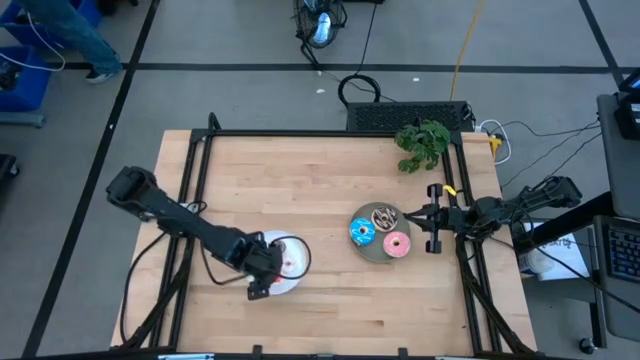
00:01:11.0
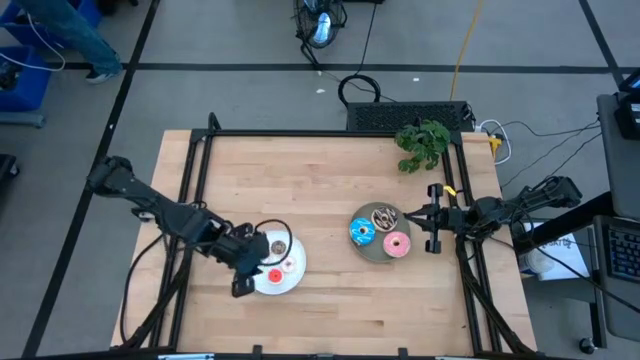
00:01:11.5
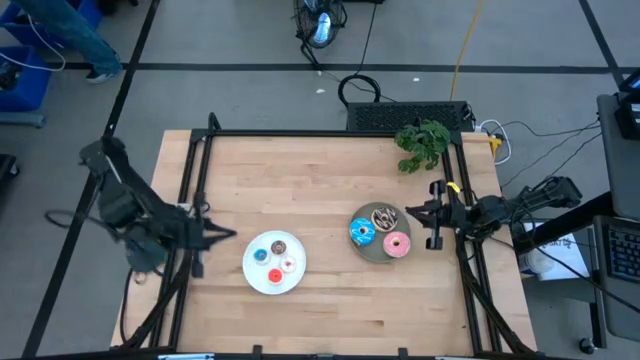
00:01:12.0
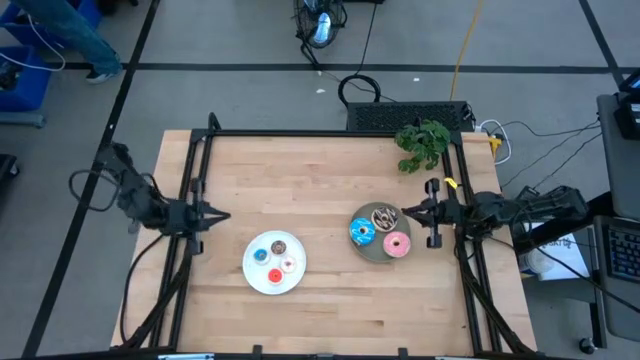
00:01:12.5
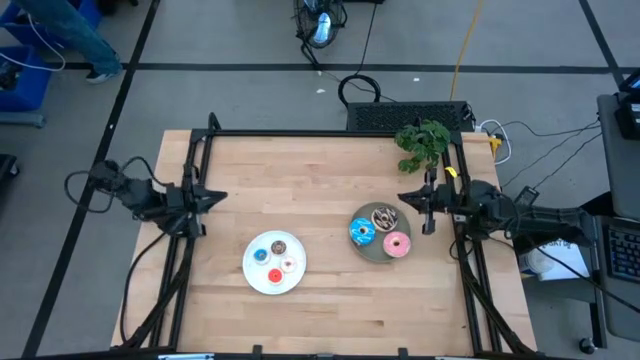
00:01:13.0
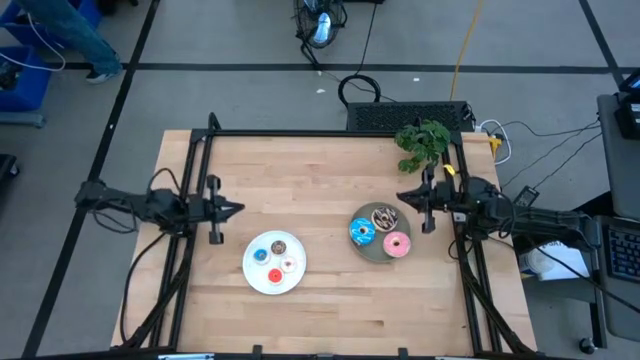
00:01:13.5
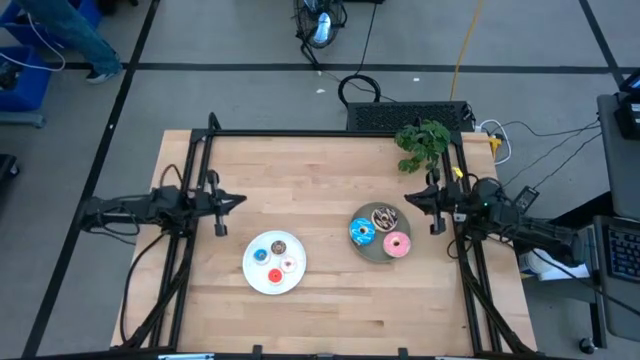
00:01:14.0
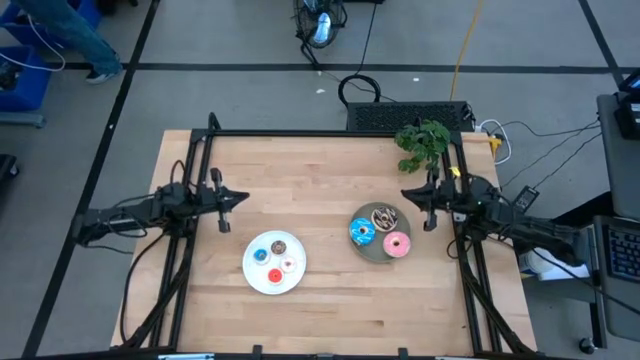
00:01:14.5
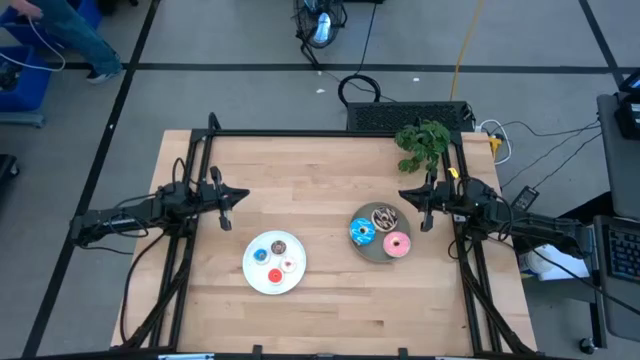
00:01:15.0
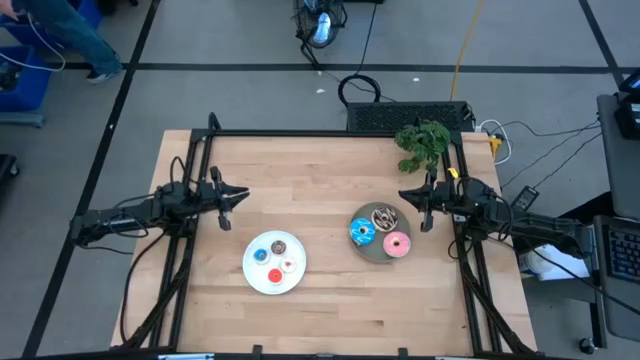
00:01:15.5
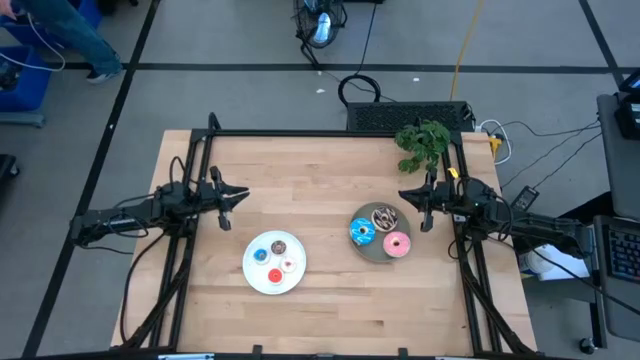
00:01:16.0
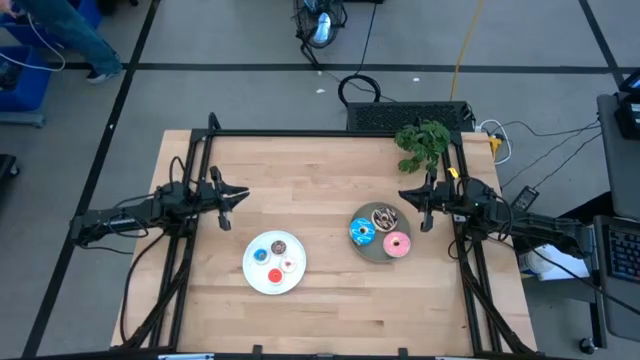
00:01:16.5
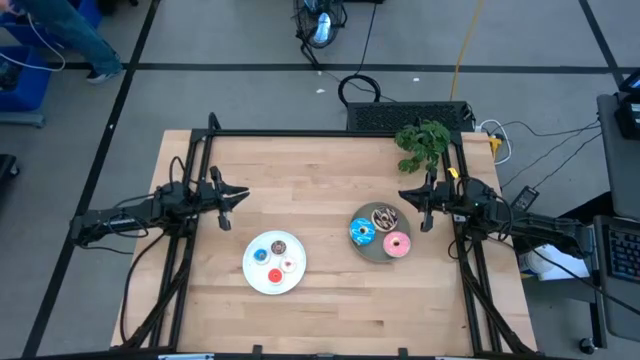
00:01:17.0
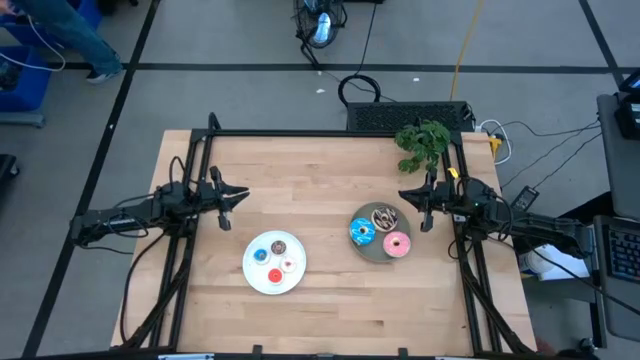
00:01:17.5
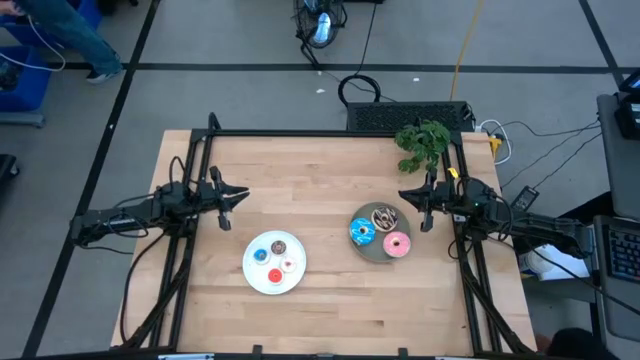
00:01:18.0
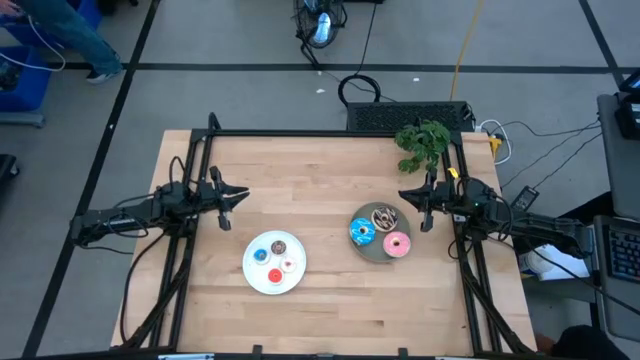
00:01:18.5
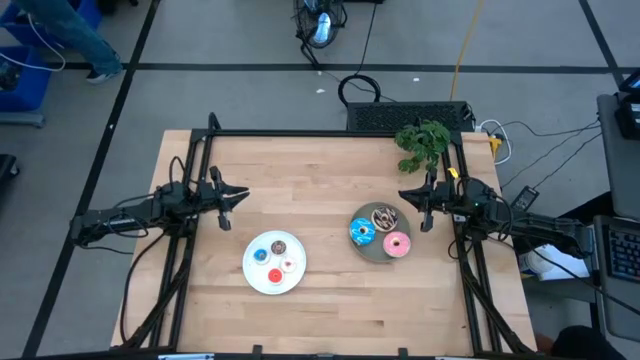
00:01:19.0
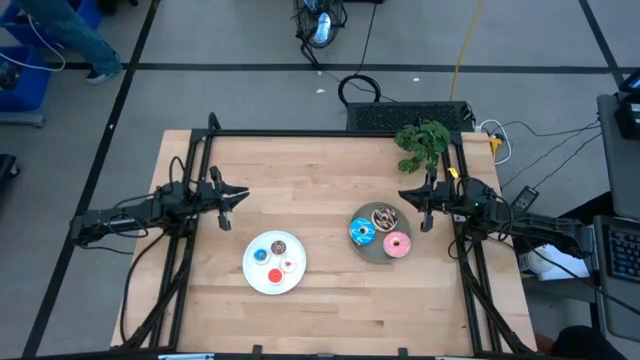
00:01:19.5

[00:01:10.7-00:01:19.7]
Task: Pick & Place donuts
Return to Home Position

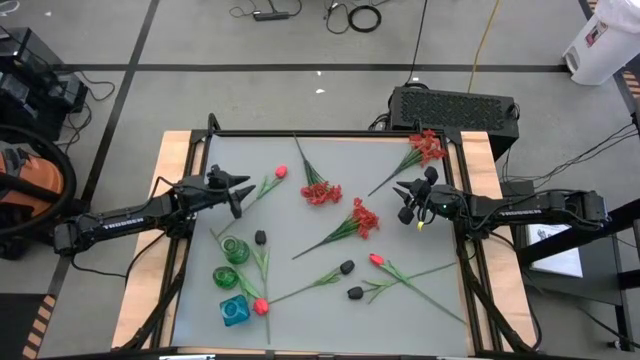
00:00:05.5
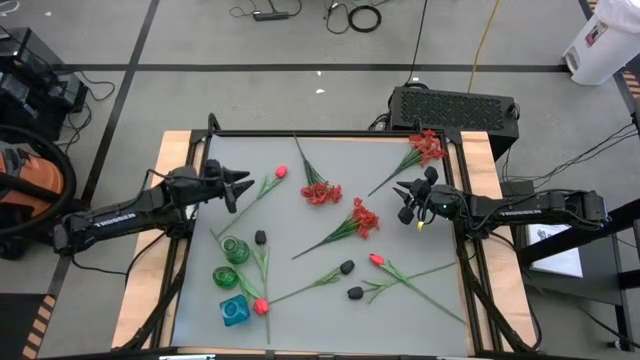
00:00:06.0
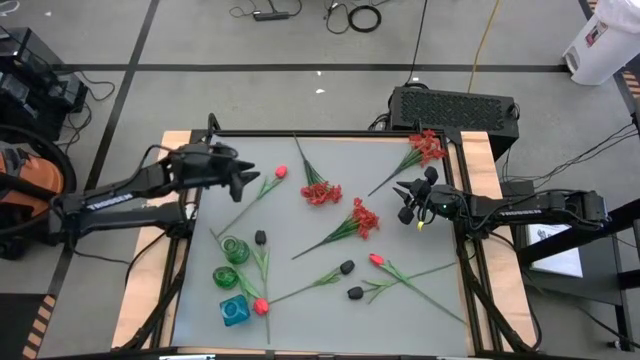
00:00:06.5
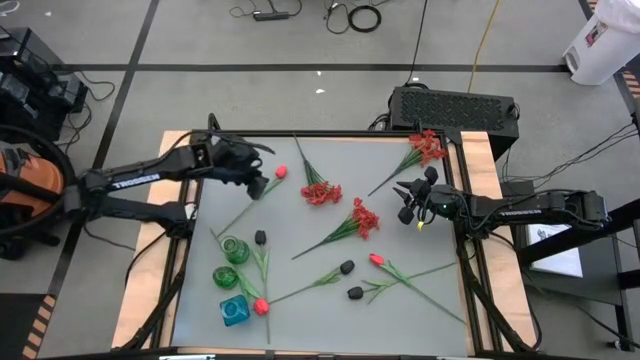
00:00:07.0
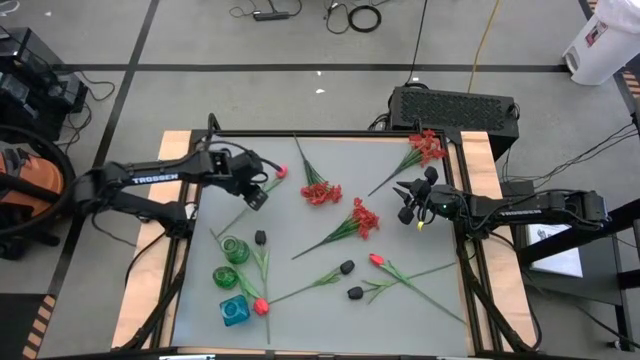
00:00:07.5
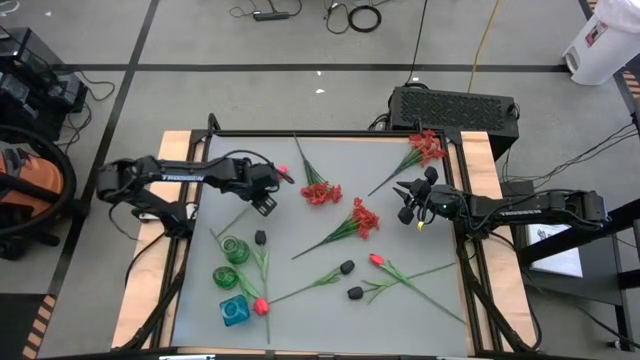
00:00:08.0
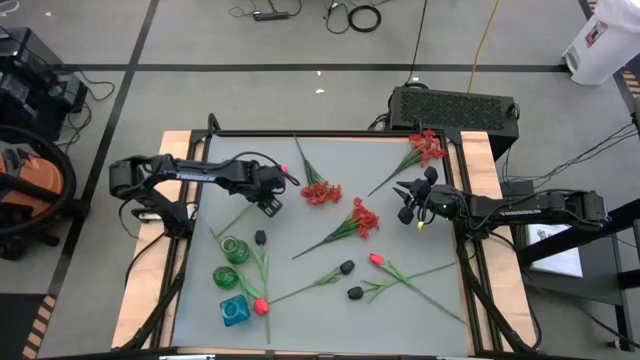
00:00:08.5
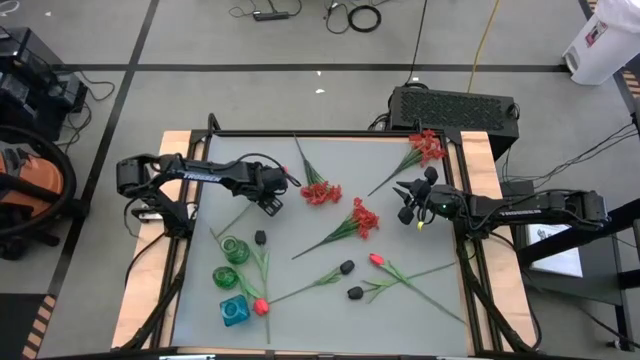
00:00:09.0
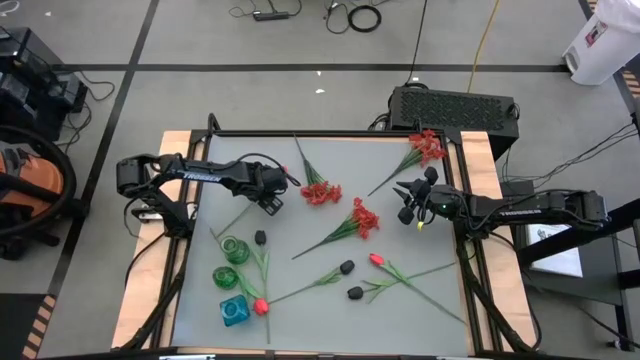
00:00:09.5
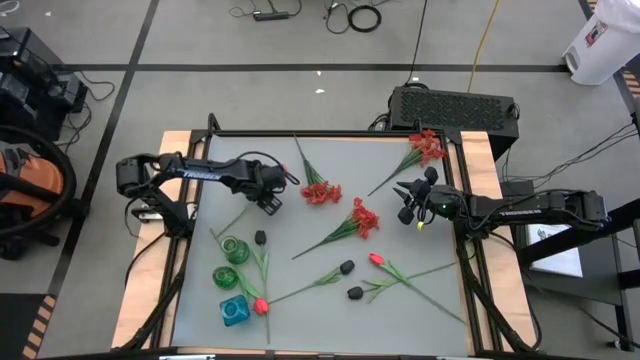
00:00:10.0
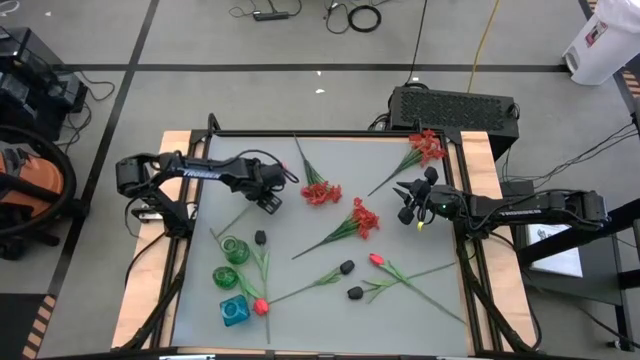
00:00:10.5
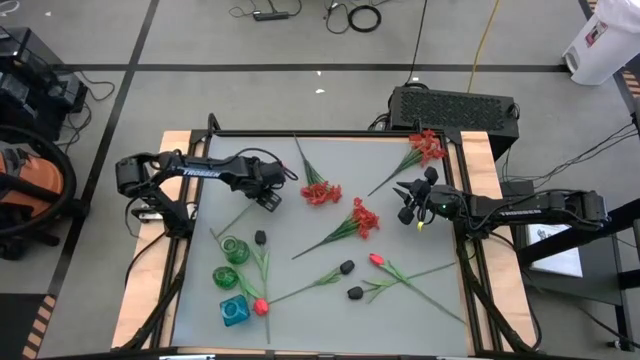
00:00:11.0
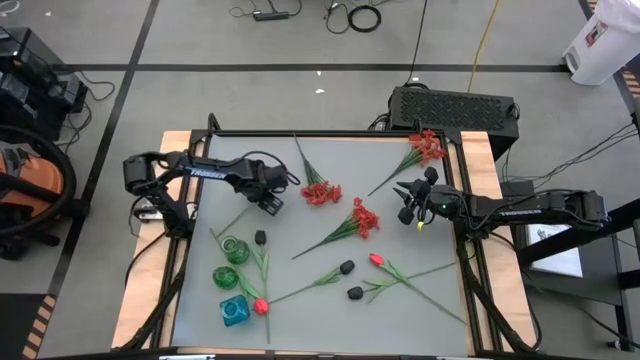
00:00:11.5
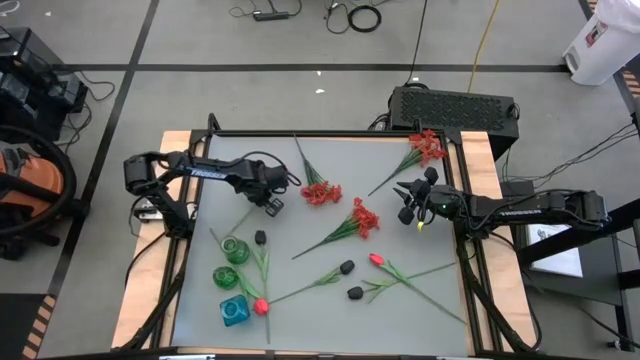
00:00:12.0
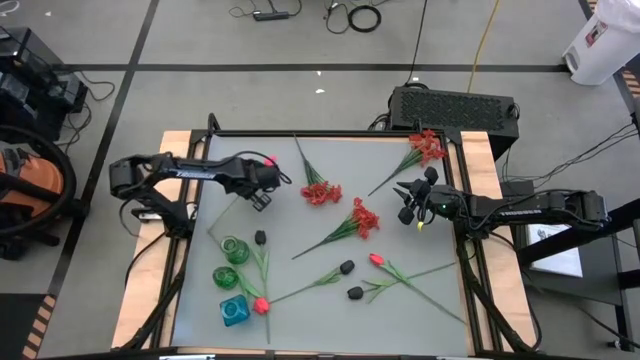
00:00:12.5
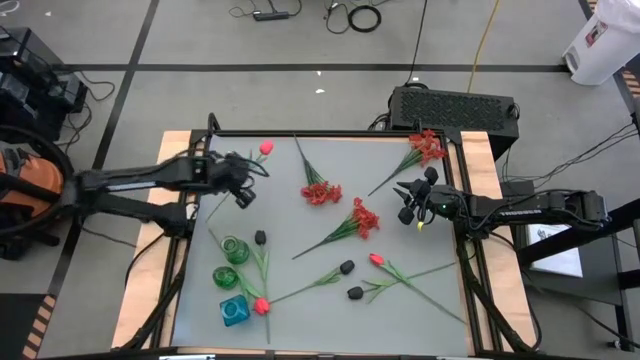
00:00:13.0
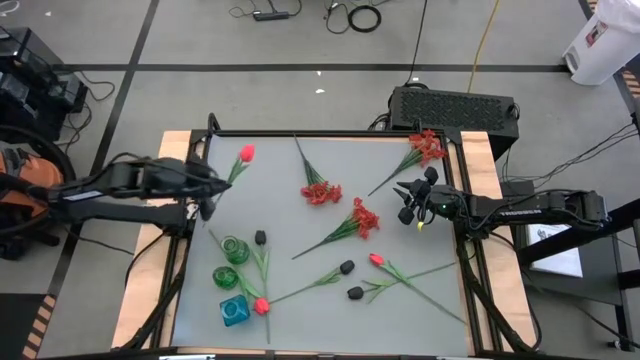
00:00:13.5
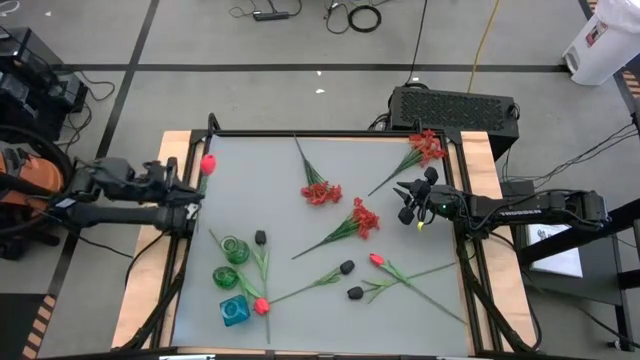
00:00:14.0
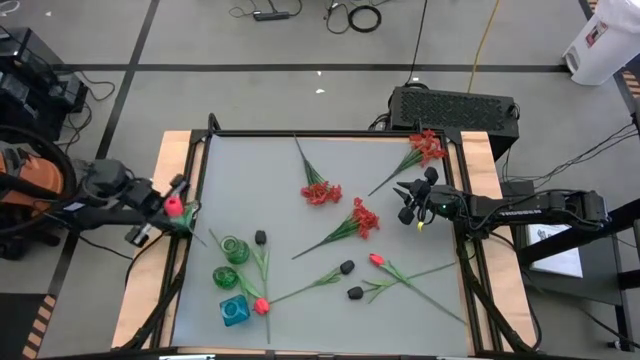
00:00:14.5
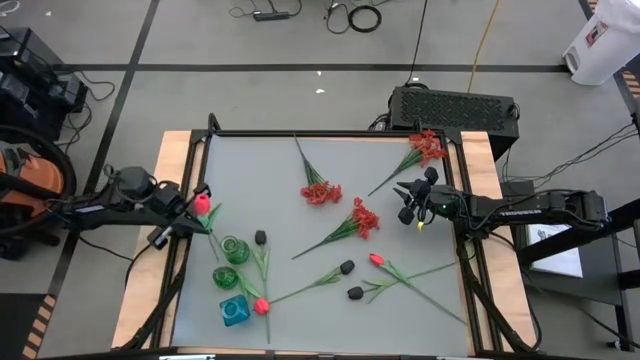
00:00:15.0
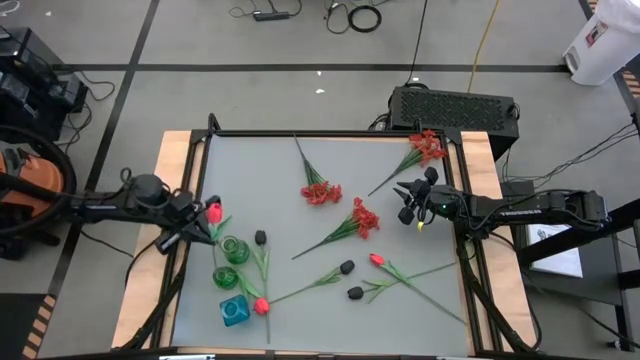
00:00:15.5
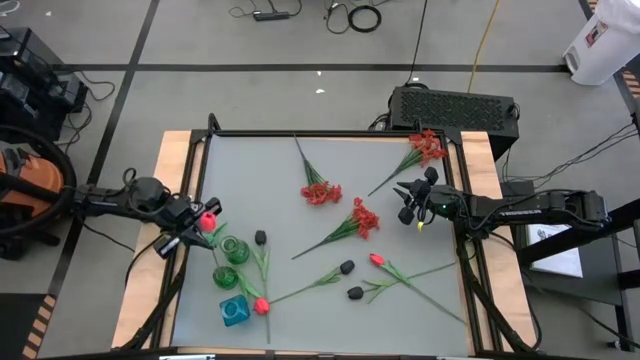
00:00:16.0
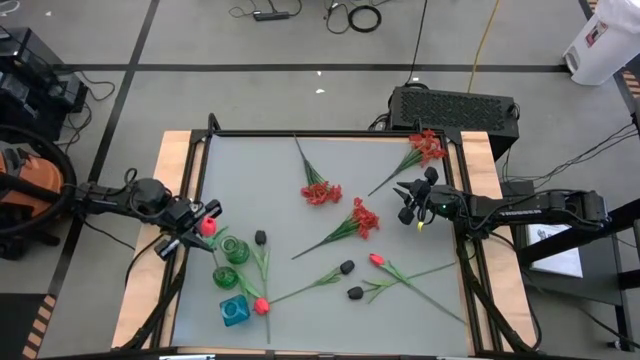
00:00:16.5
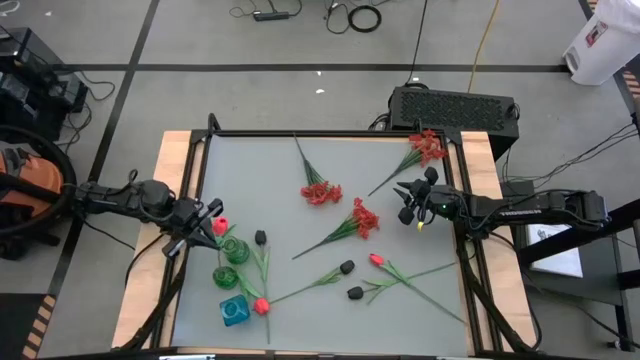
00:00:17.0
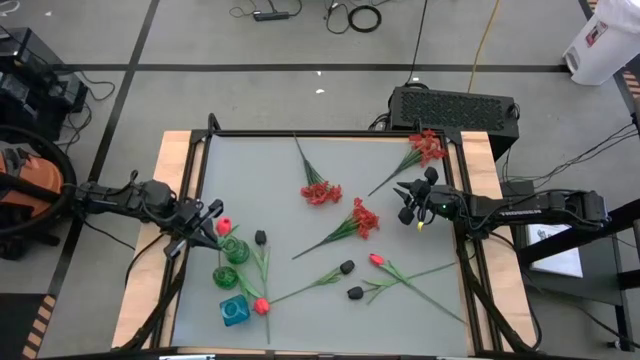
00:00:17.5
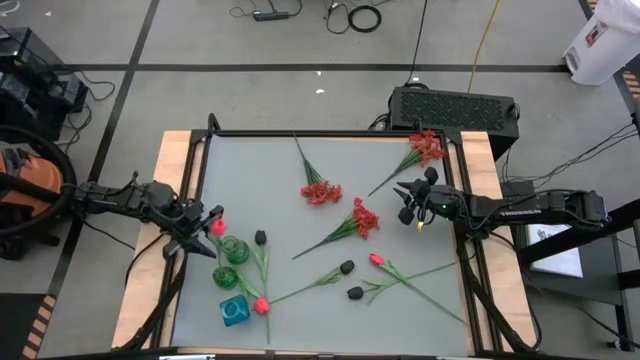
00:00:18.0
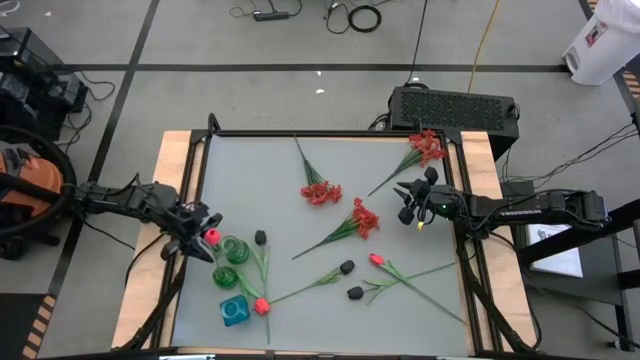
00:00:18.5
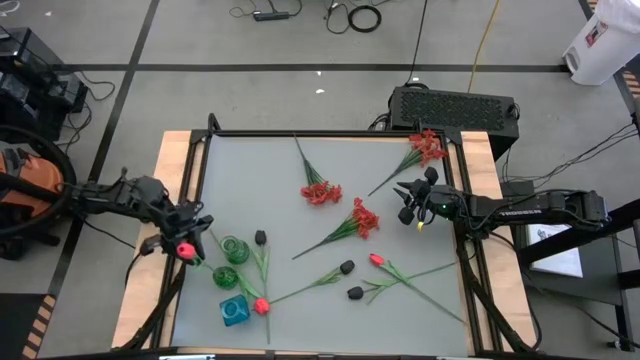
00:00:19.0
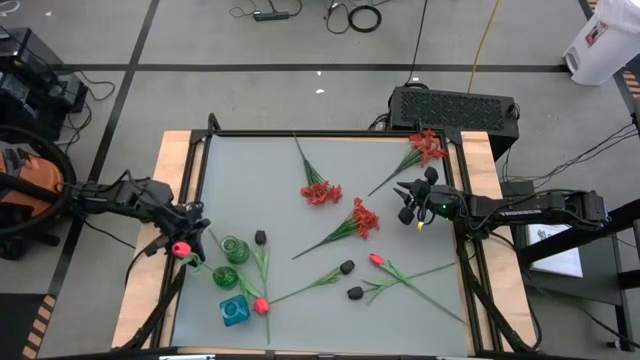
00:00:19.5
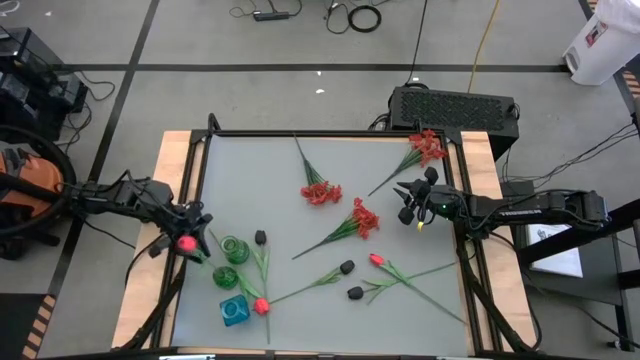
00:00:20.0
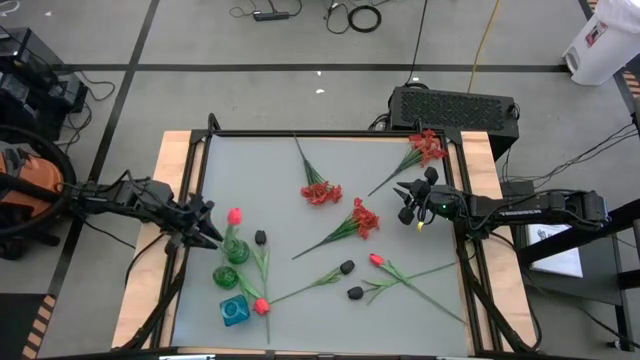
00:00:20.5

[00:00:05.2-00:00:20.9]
Task: Sort flowers into vase by color
Put the top light orange flower into the bottom green vase
